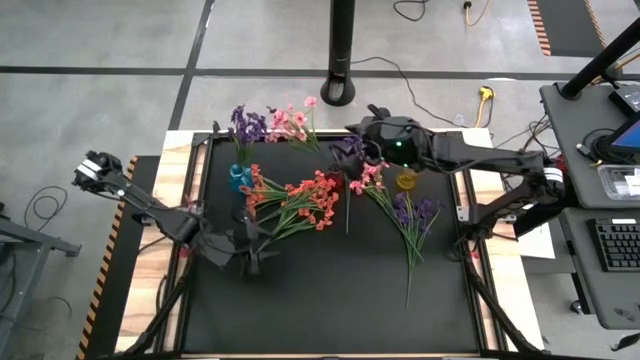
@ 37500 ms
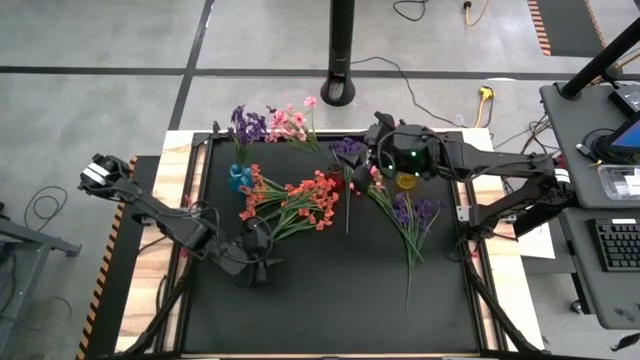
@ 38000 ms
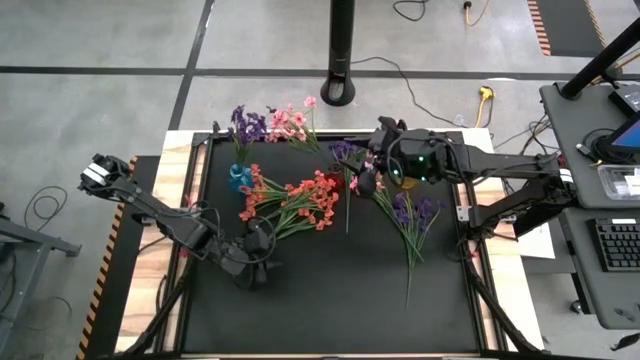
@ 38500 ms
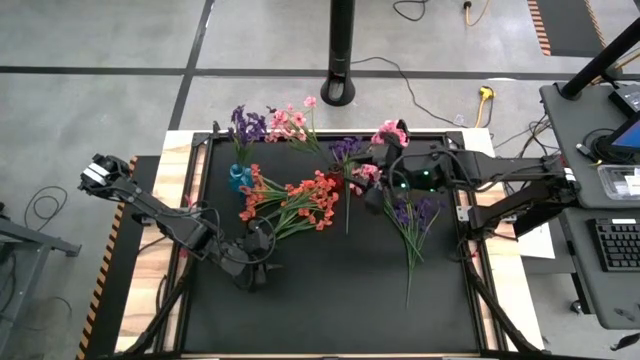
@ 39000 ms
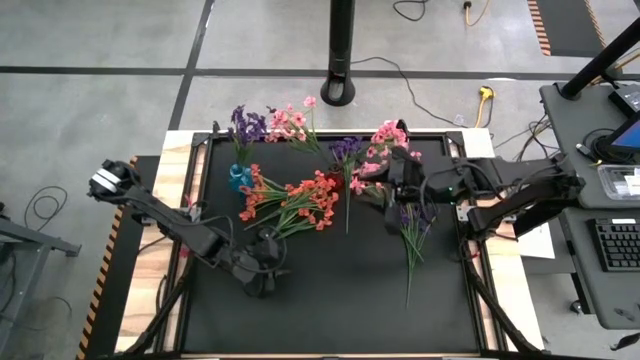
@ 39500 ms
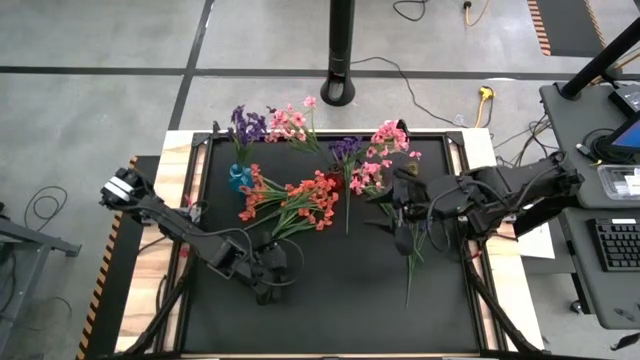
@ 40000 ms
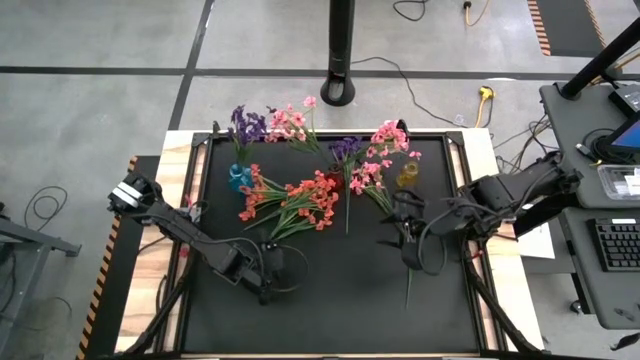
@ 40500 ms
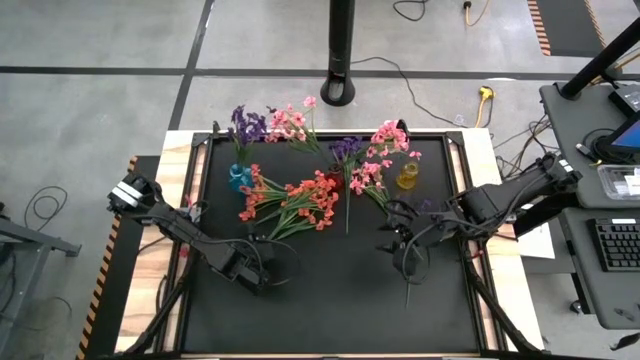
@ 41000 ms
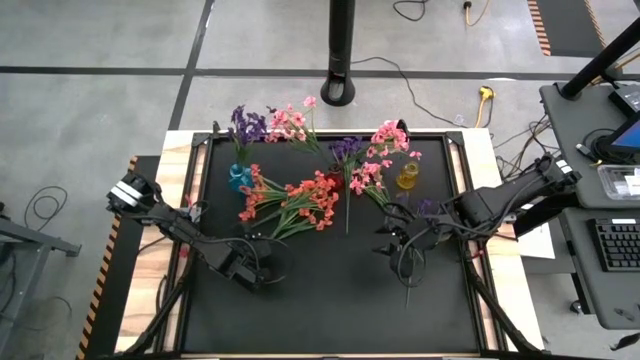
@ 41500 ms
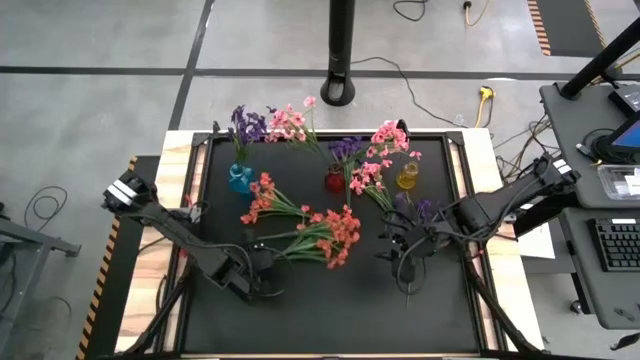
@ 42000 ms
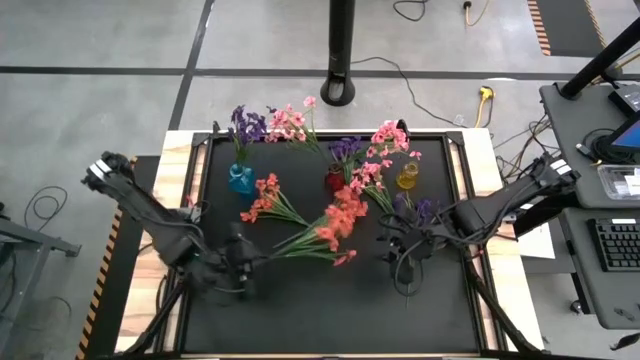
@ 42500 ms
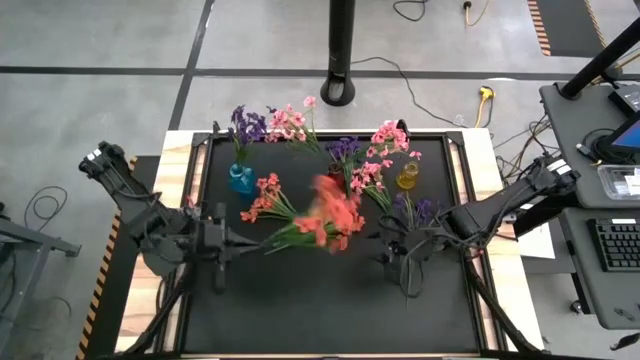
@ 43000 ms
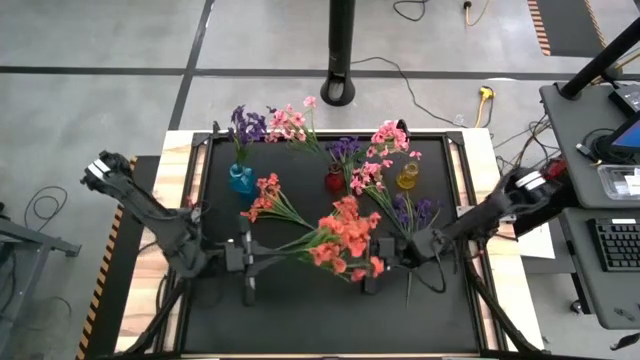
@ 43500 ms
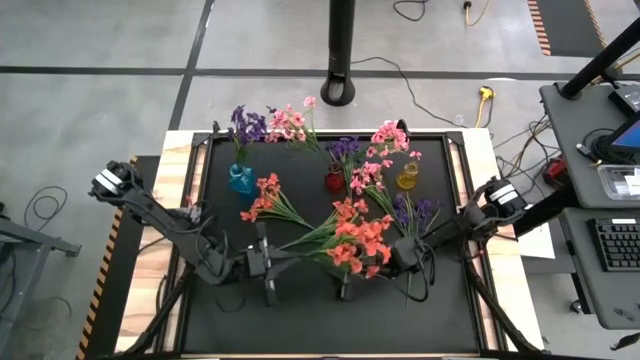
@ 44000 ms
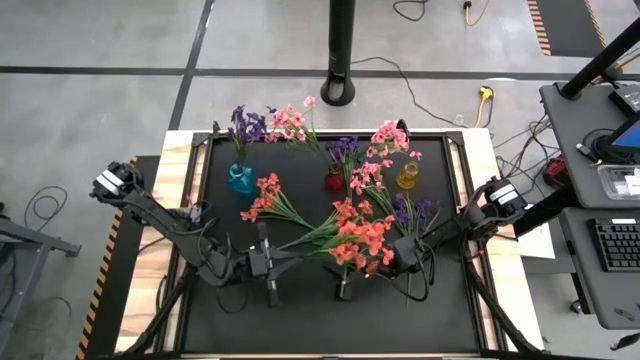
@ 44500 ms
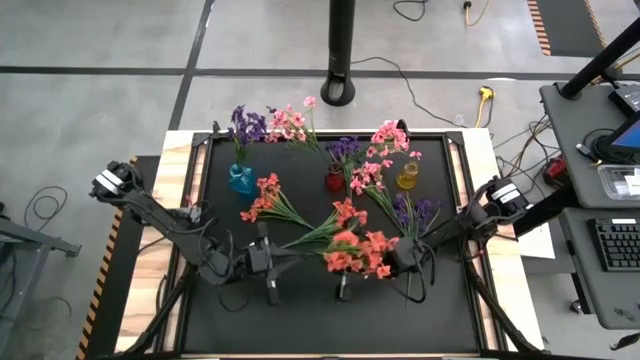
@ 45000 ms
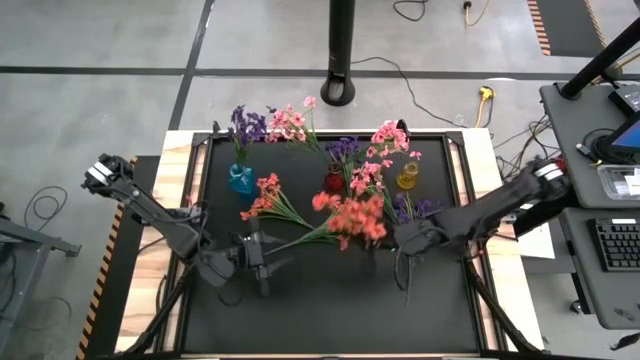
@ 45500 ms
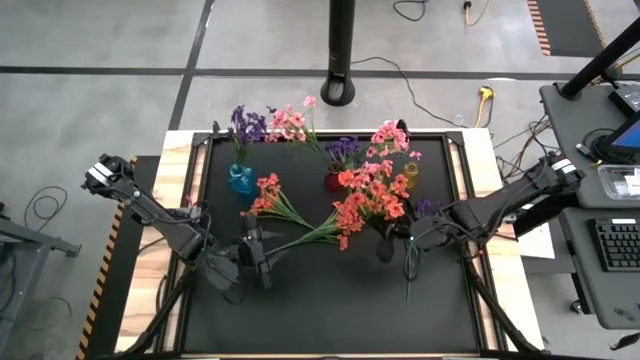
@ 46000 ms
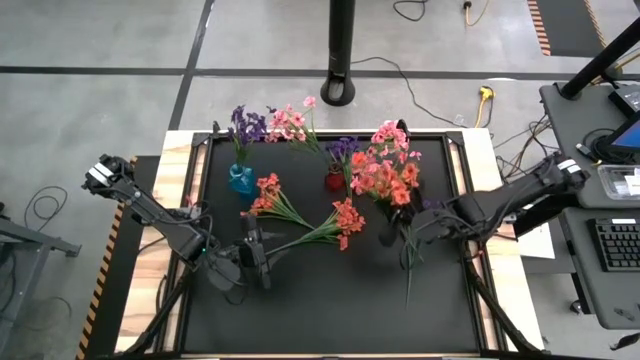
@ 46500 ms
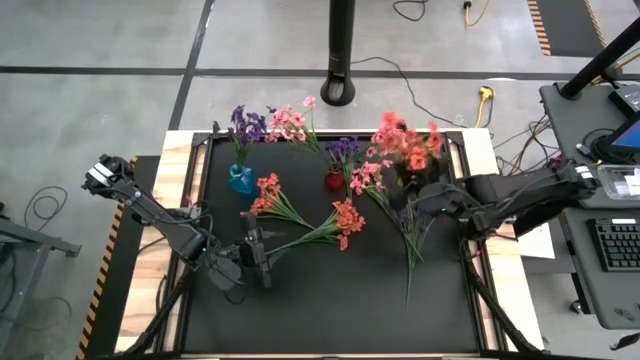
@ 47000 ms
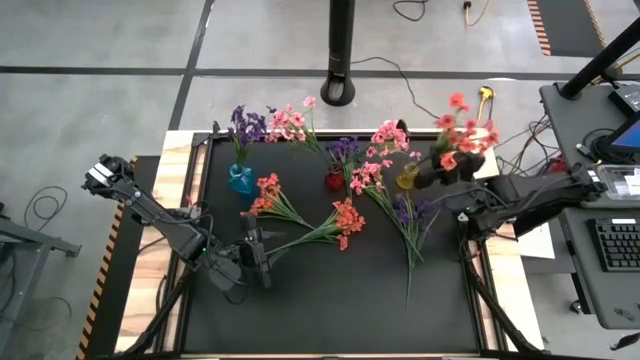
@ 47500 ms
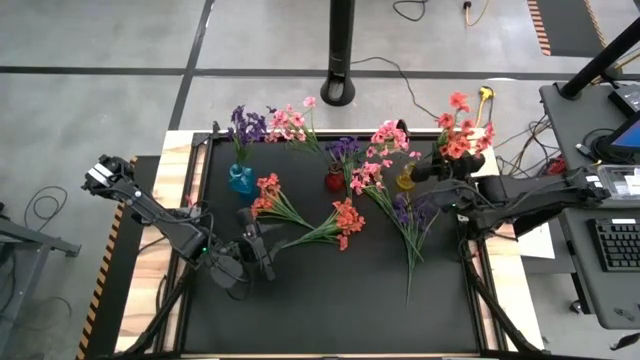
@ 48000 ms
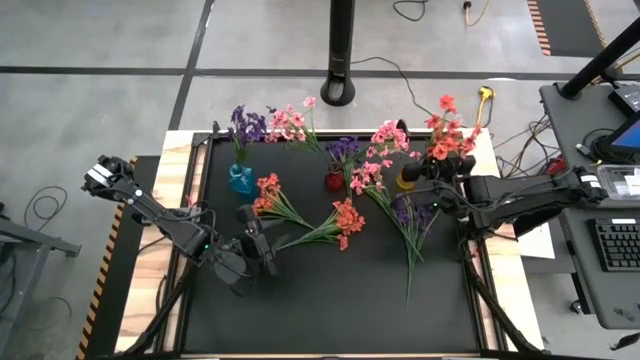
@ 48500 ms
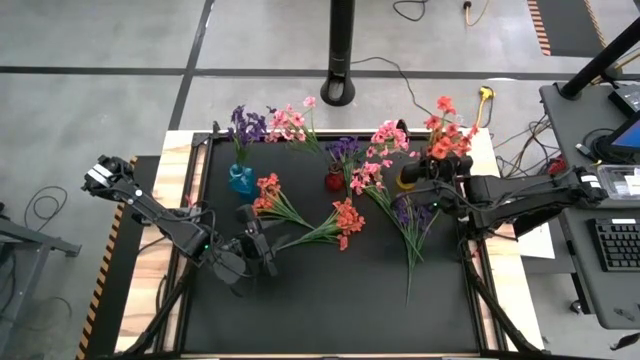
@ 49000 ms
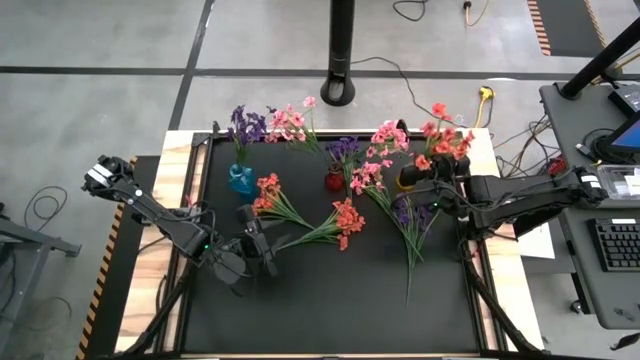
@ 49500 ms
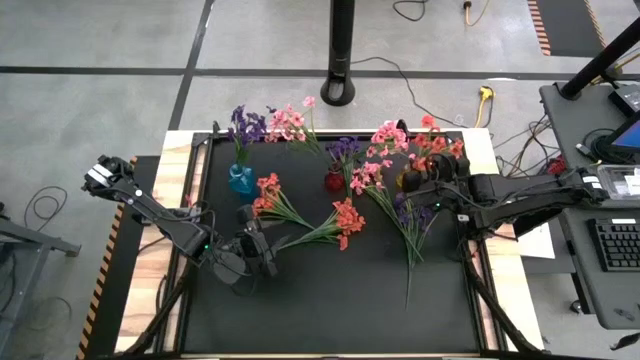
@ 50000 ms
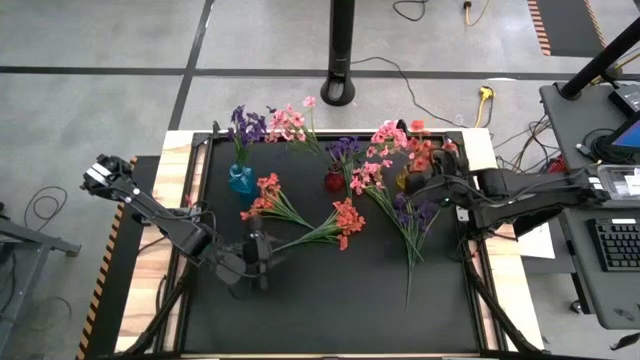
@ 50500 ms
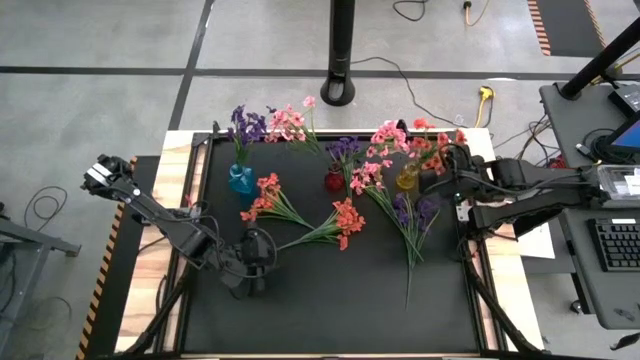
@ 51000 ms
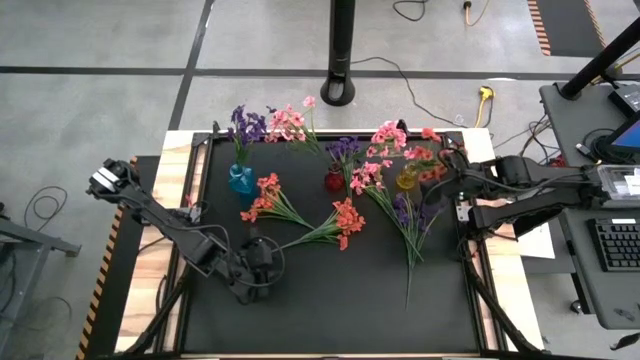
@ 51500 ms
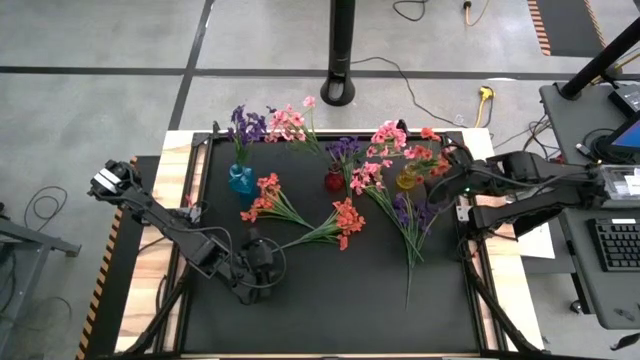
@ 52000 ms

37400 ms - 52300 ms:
Task: Sort flowers into vase by color
Put the bottom left orange flower into the yellow vase

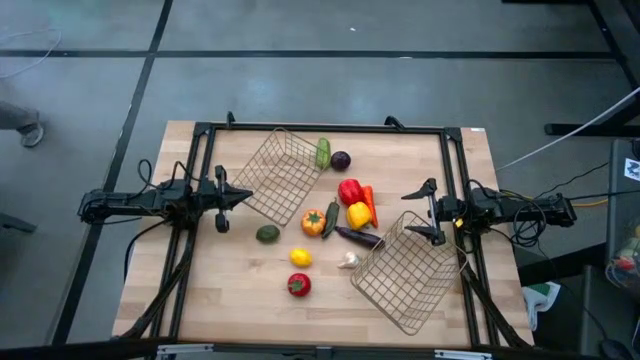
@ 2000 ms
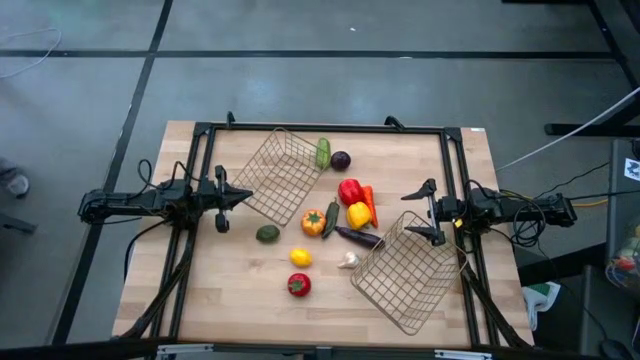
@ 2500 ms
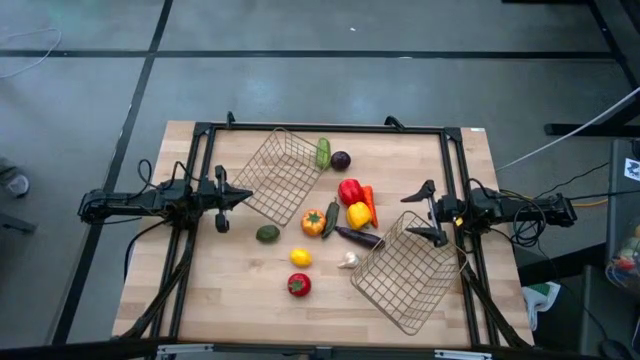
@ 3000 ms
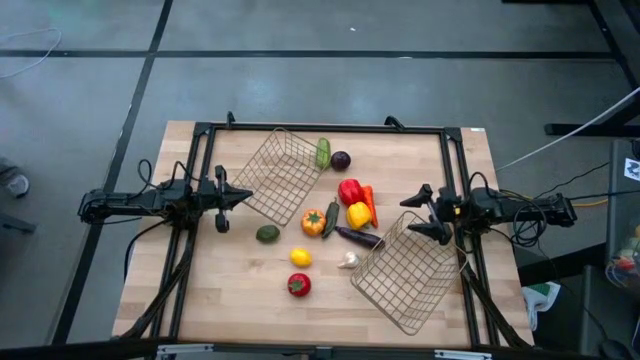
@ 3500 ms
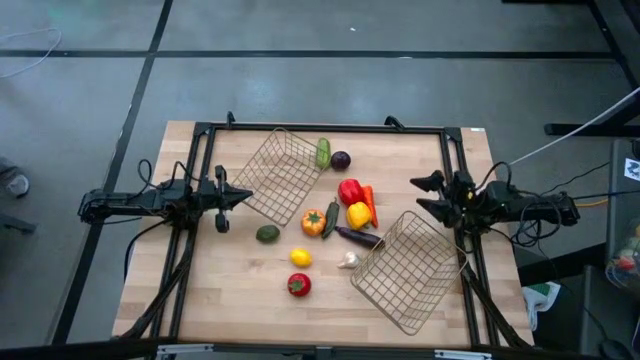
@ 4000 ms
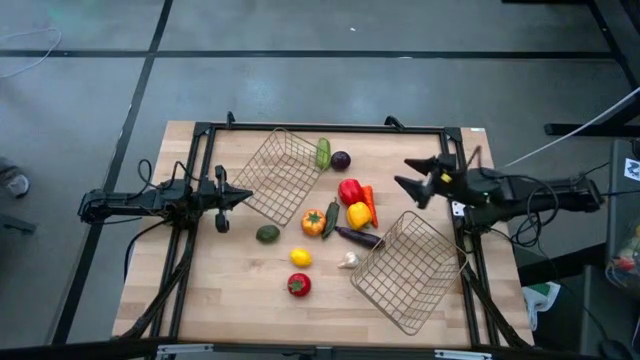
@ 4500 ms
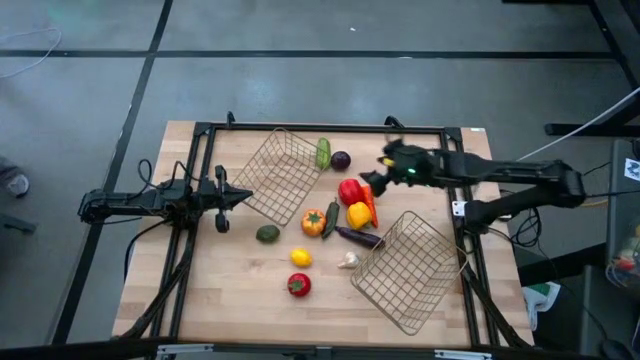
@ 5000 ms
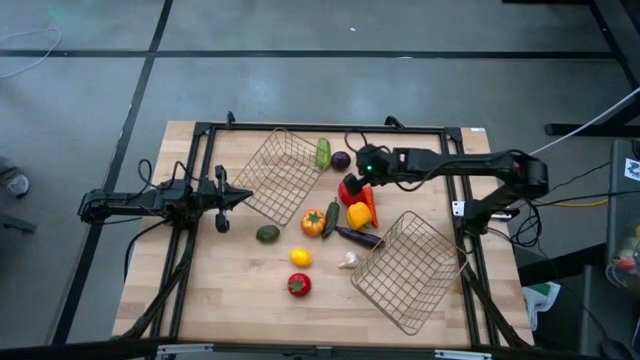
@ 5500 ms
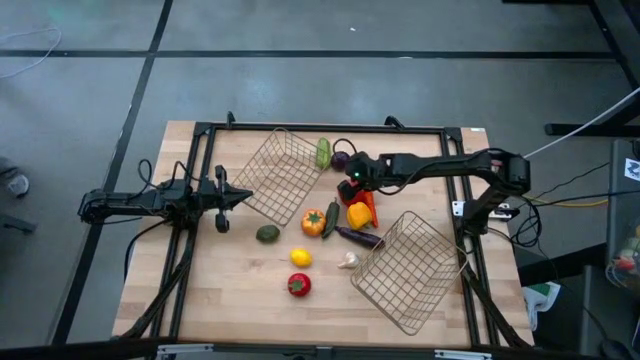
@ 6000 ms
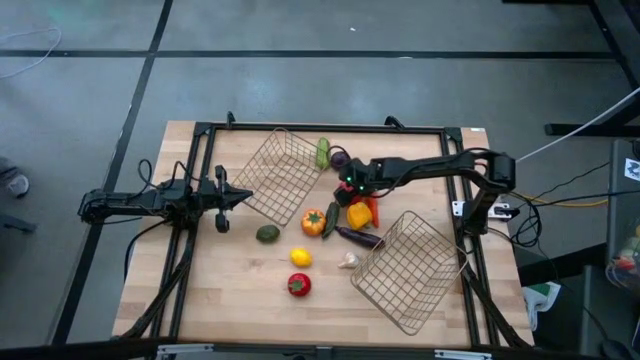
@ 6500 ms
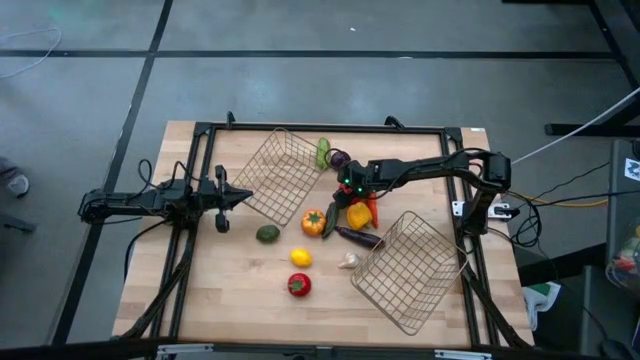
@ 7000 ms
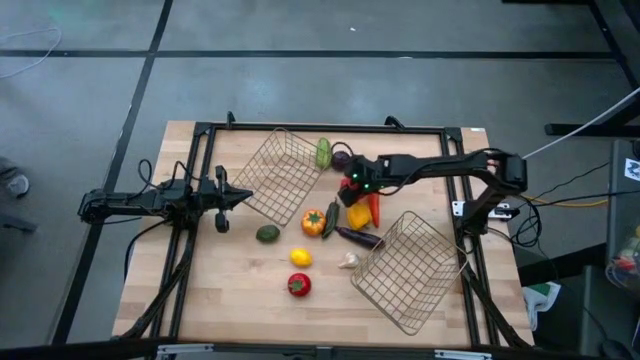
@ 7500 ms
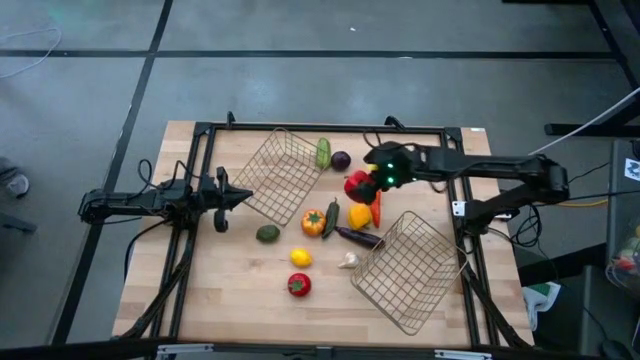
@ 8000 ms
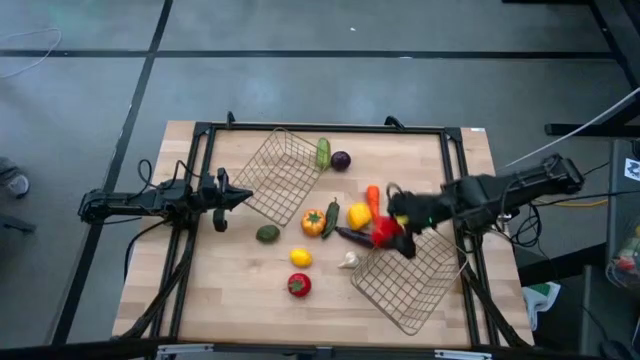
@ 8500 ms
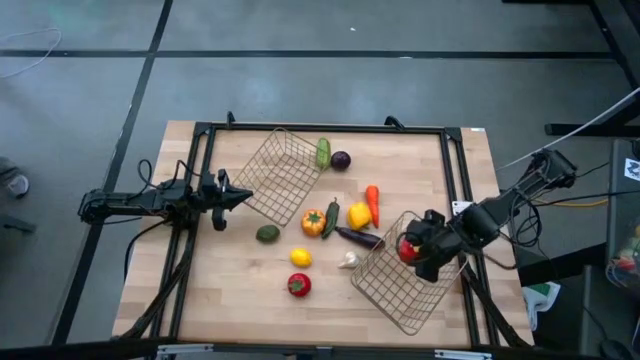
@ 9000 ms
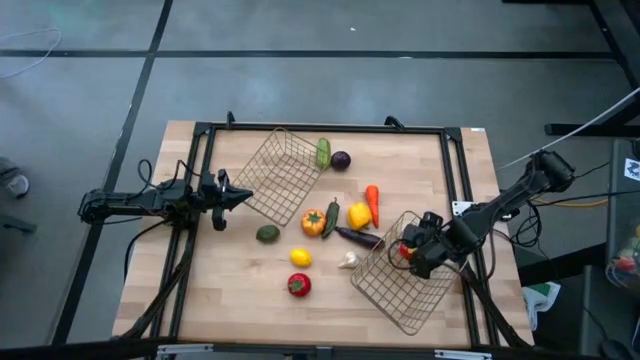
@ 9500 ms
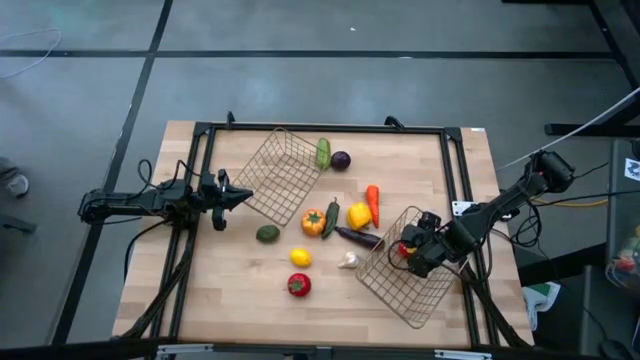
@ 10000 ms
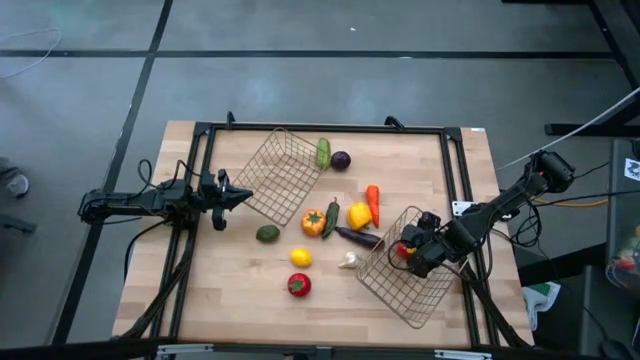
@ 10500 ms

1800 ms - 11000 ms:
Task: Sort produce into baskets
Put the red bell pepper into the bottom basket
